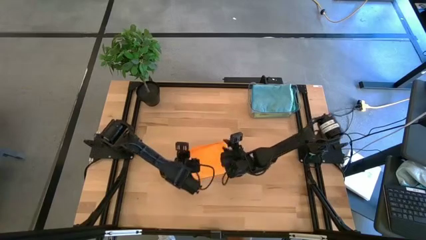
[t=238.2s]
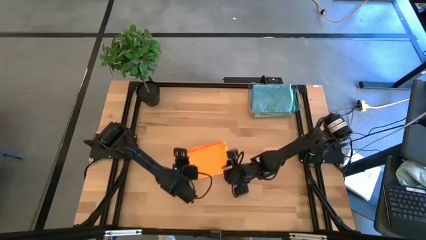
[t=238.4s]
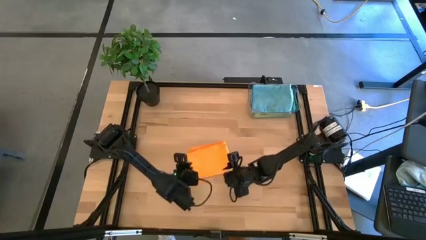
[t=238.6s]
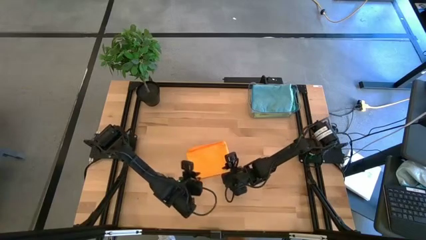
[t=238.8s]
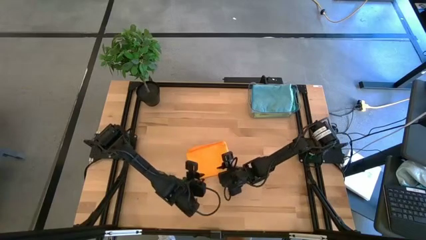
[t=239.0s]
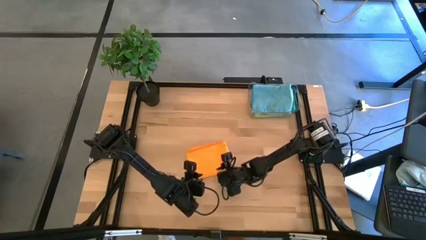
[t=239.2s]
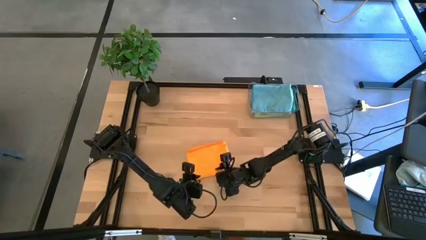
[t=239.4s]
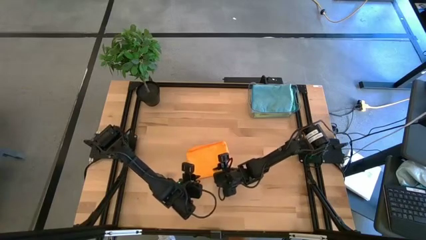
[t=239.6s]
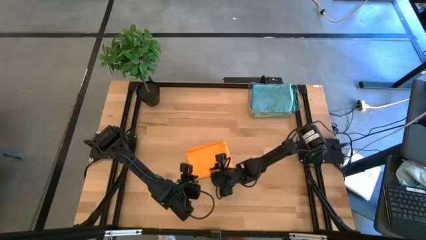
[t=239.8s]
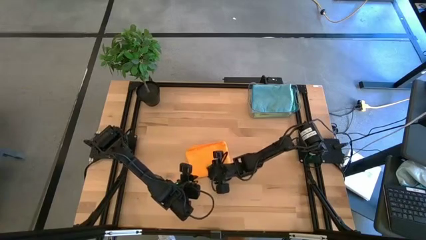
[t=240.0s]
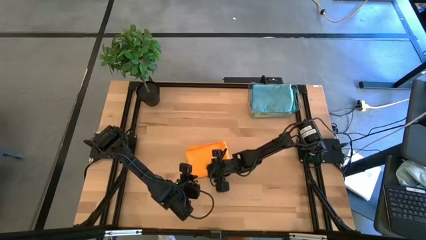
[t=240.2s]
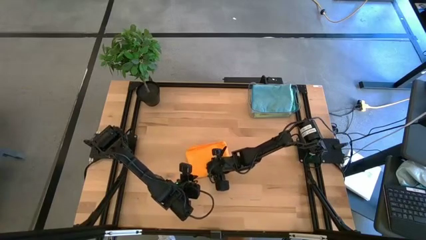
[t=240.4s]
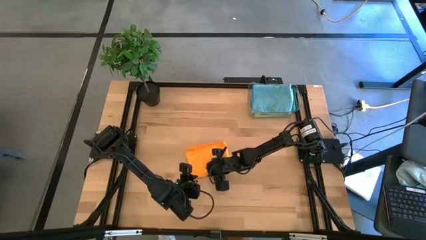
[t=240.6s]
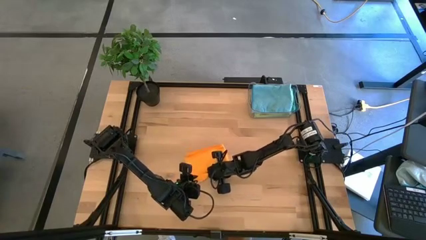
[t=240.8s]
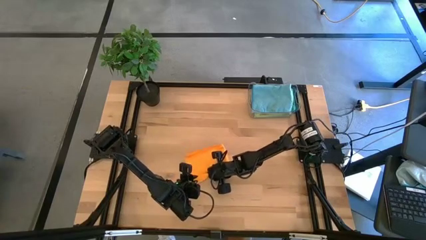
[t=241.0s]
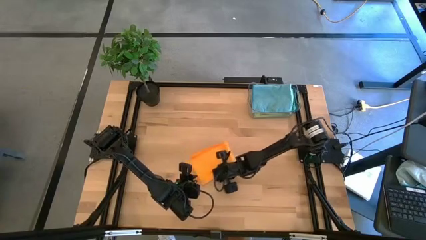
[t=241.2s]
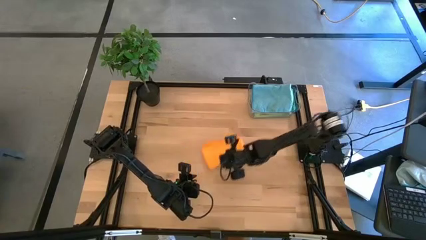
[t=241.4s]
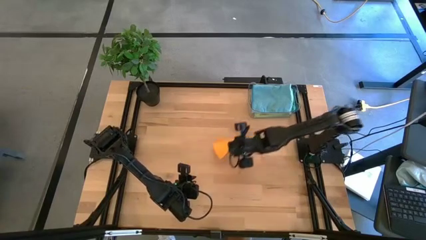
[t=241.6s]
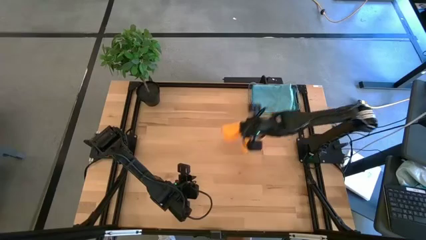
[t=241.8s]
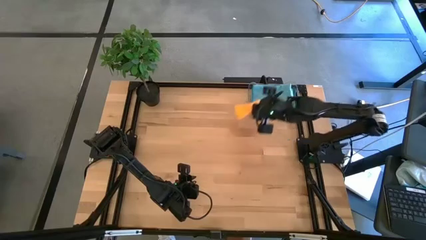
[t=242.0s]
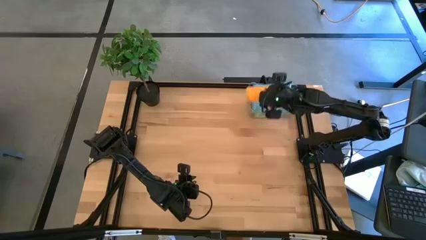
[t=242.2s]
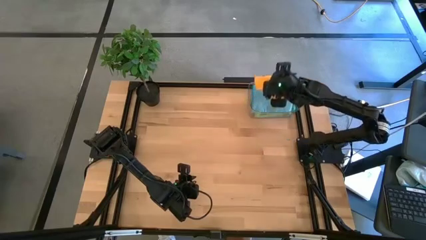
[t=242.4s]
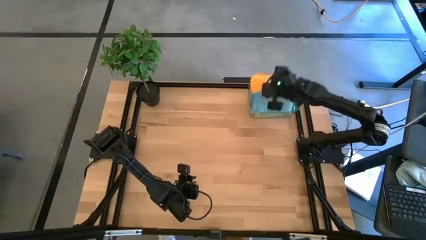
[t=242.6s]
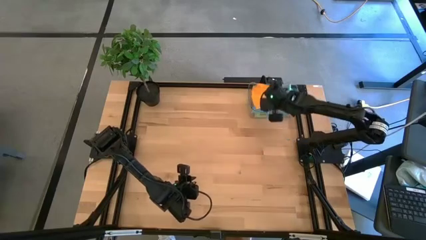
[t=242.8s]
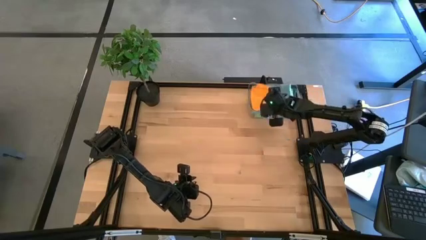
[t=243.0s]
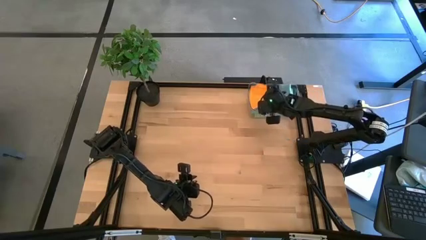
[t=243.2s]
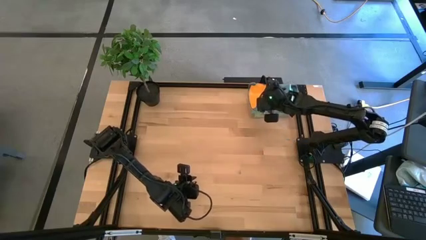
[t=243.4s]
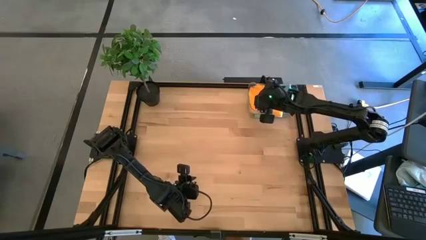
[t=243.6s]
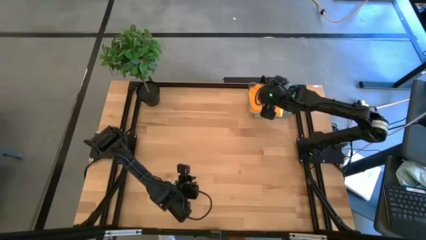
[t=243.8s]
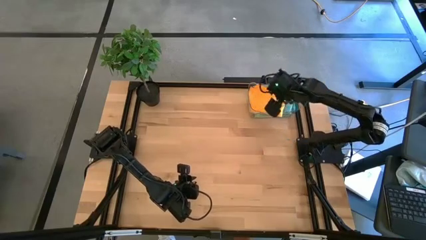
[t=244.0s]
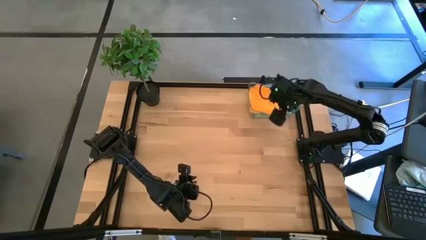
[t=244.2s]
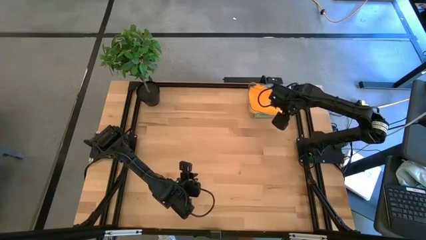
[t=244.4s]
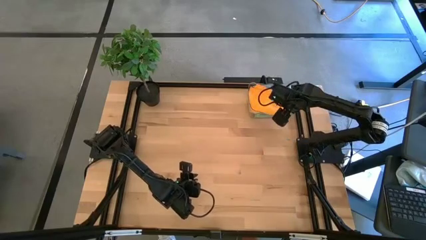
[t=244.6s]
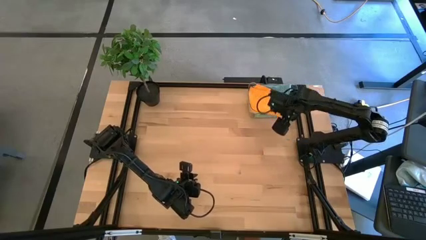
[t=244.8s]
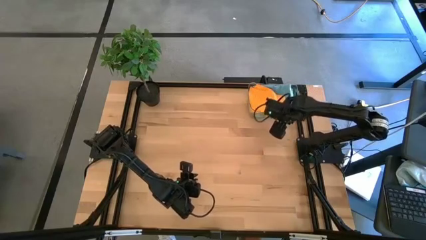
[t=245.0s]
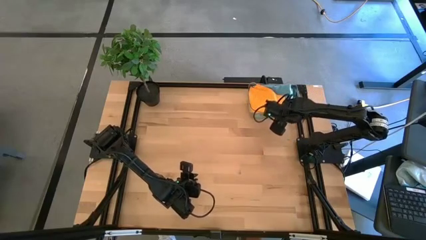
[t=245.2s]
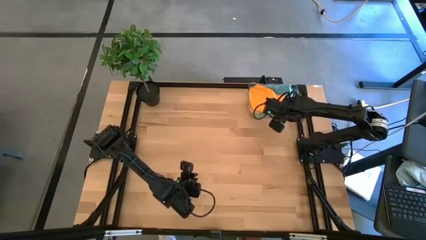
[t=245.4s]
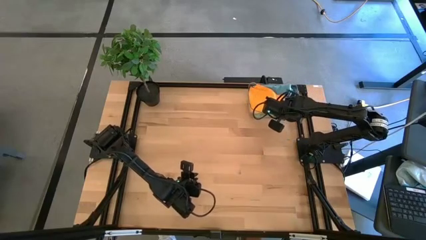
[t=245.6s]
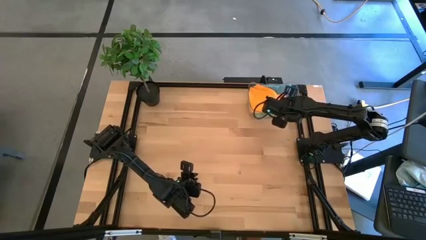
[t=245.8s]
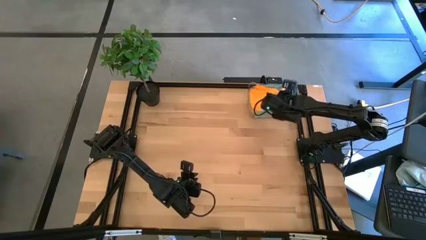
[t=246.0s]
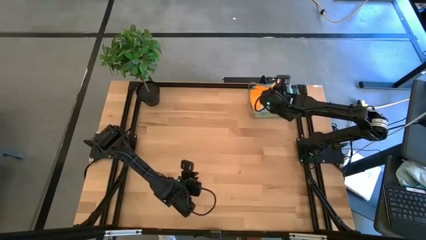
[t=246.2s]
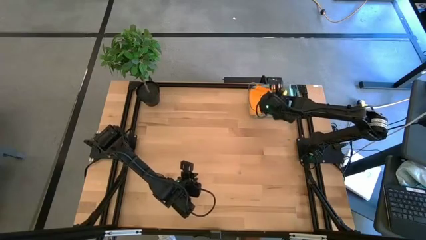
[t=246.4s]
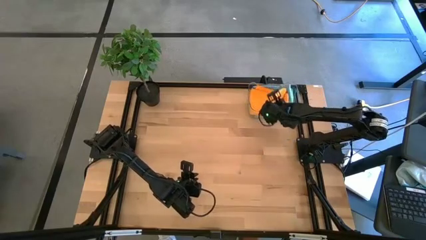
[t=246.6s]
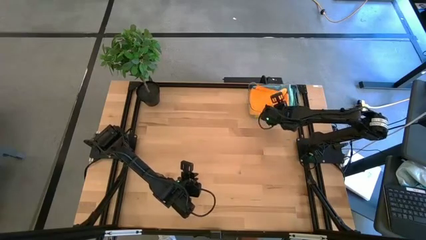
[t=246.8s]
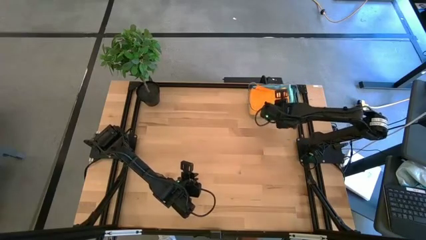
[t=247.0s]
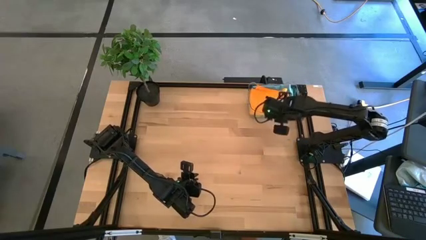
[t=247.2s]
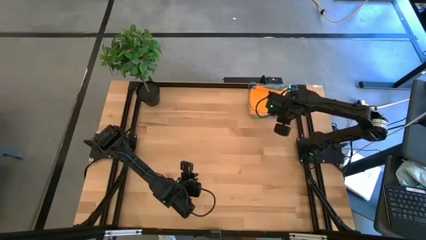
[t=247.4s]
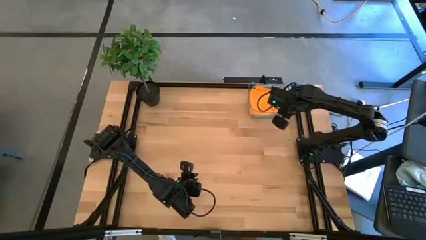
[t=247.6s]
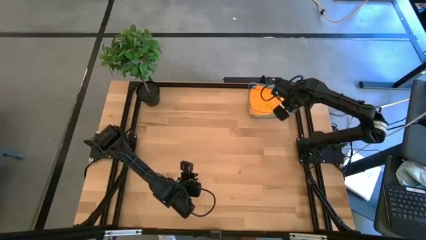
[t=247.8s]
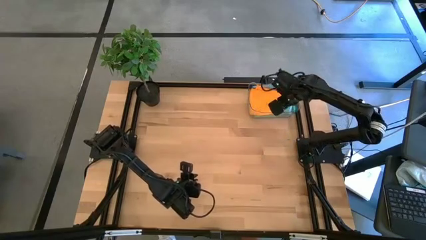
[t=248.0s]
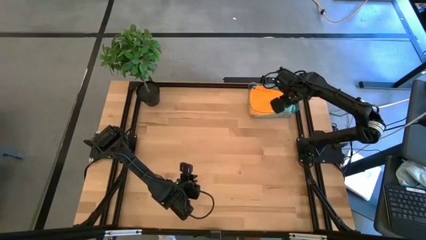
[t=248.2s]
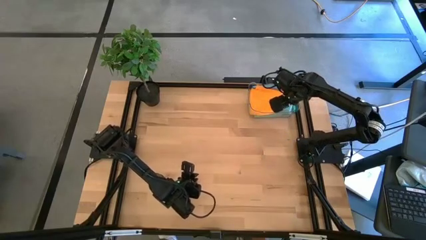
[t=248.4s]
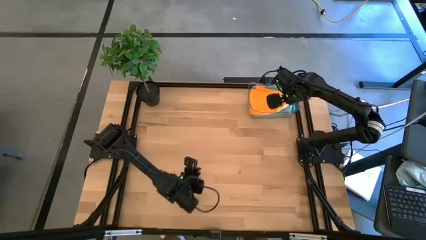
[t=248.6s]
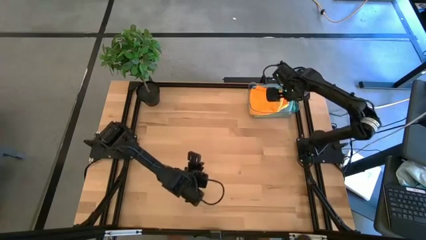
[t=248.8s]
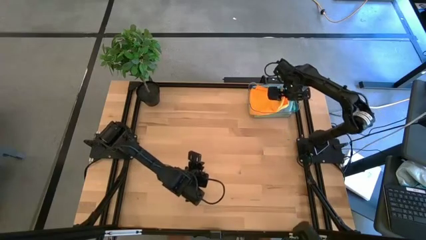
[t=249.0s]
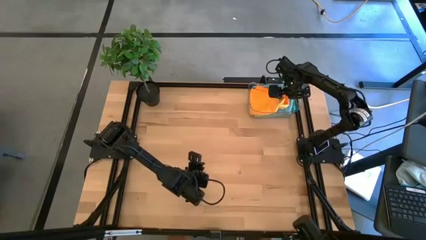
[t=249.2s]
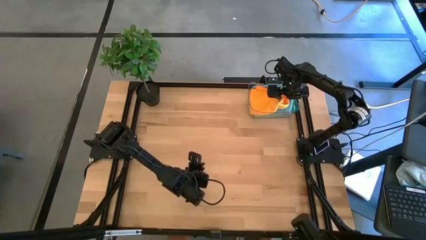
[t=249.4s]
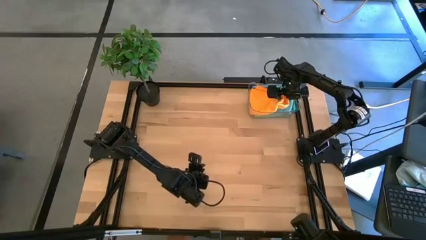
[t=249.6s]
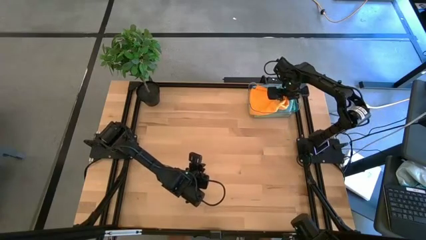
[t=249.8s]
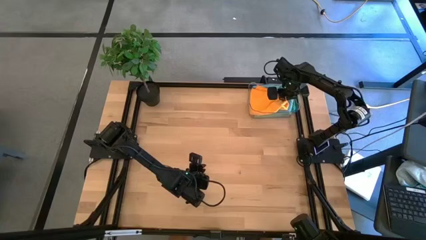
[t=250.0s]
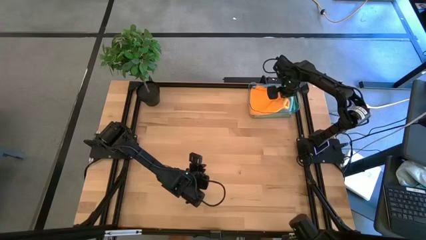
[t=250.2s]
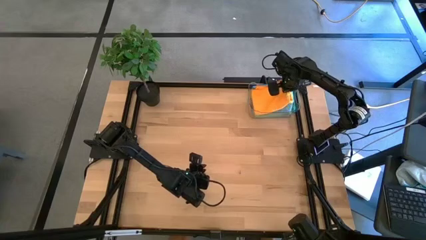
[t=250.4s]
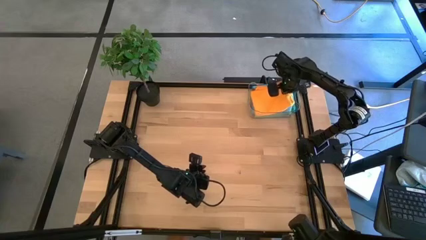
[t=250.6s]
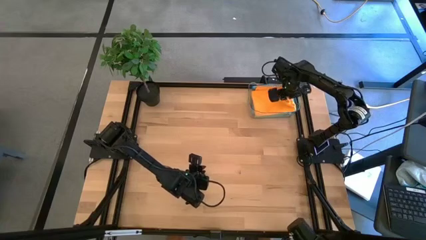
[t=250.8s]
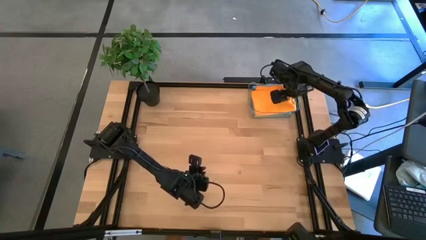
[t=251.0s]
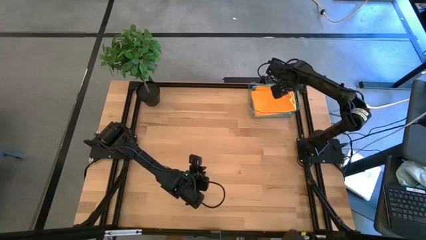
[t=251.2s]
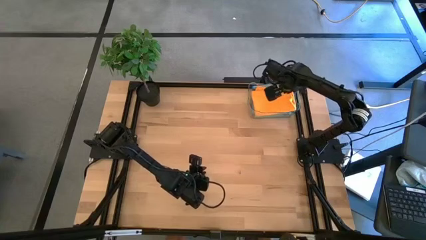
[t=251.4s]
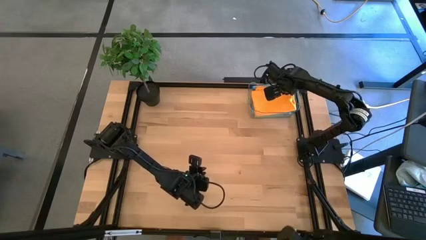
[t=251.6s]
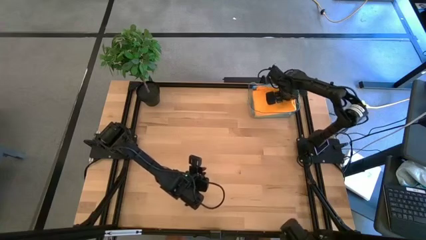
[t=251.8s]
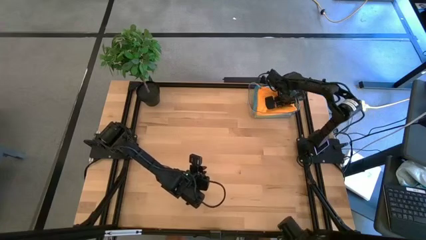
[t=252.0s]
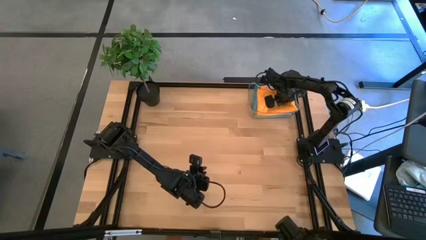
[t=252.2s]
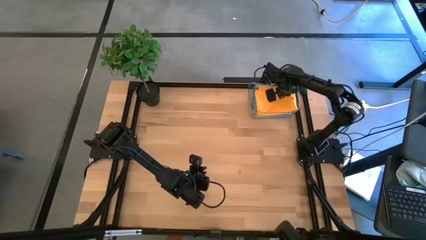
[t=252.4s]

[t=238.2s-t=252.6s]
Task: Fold microfiber towels
Put the orange microfiber towel into the transparent bin

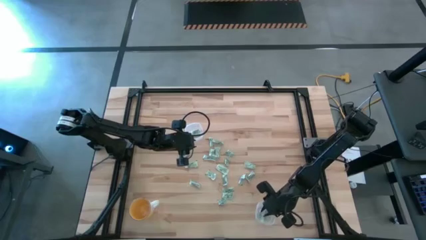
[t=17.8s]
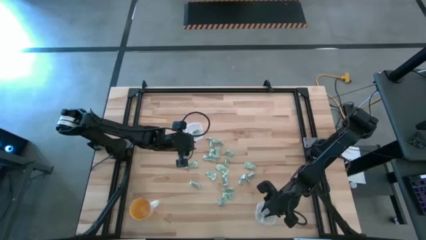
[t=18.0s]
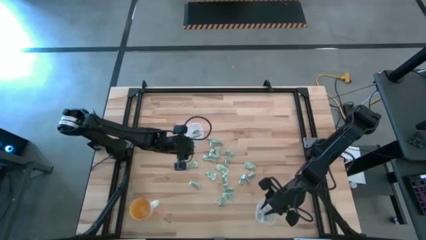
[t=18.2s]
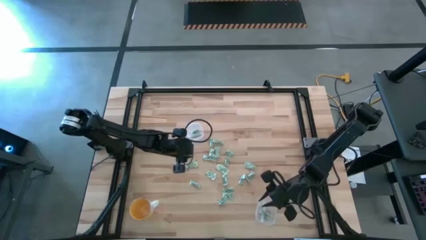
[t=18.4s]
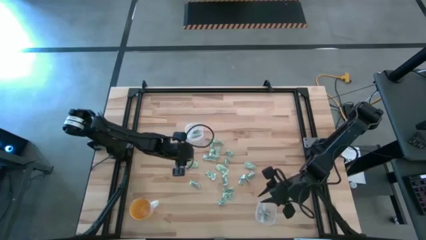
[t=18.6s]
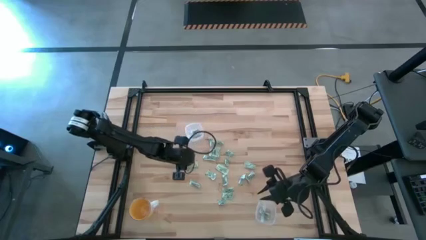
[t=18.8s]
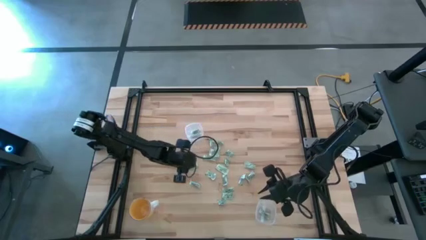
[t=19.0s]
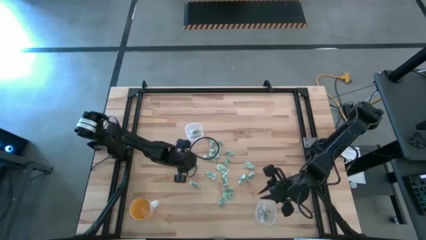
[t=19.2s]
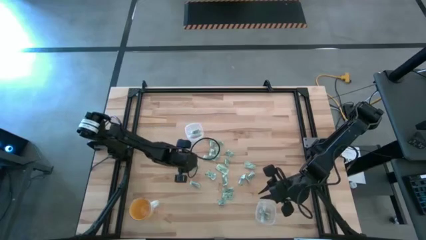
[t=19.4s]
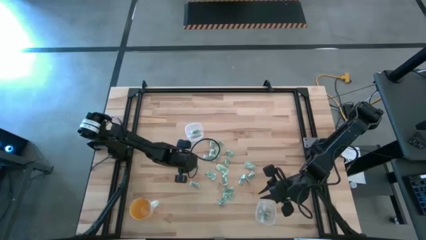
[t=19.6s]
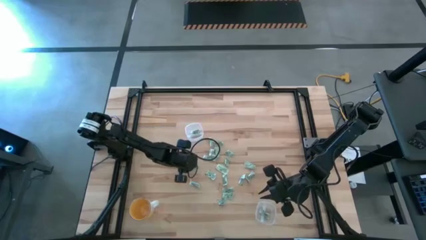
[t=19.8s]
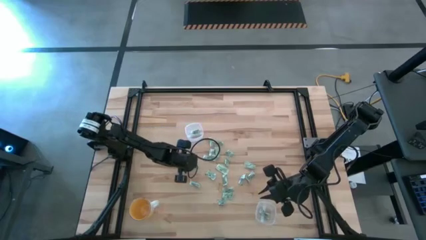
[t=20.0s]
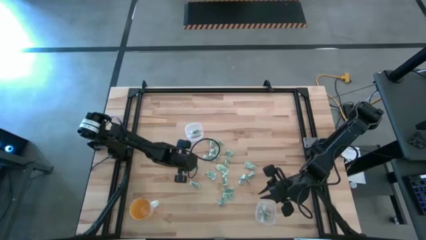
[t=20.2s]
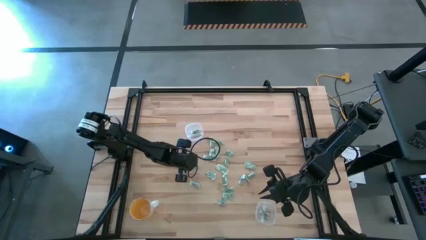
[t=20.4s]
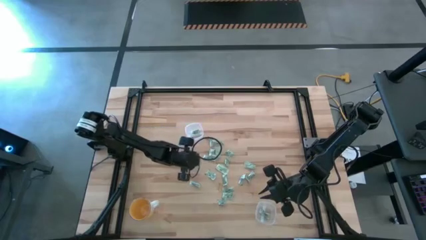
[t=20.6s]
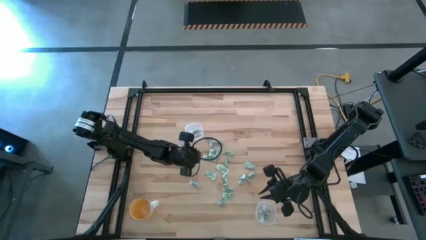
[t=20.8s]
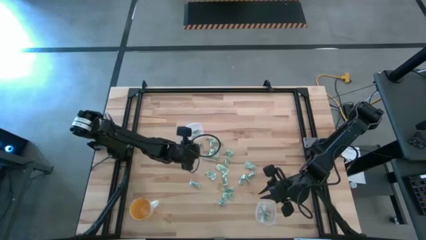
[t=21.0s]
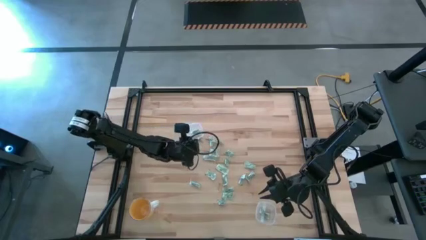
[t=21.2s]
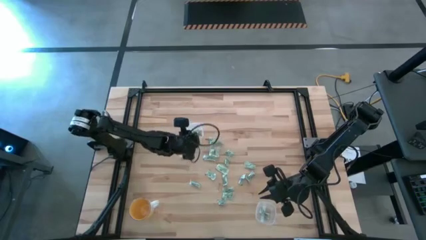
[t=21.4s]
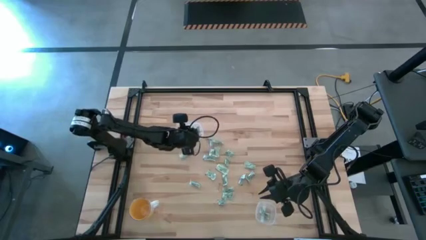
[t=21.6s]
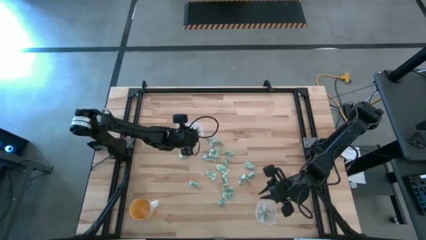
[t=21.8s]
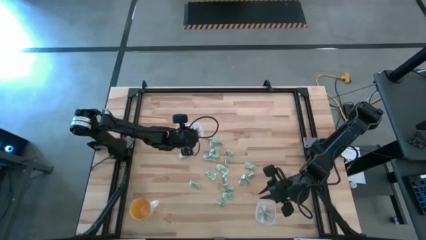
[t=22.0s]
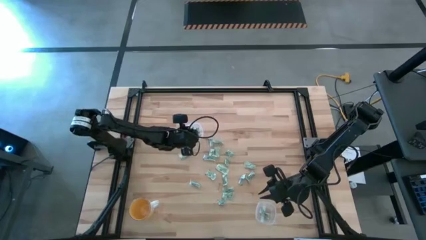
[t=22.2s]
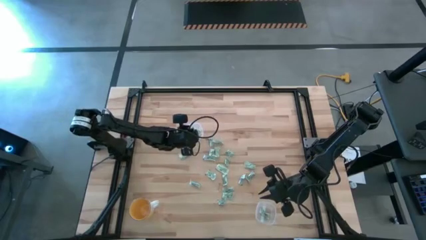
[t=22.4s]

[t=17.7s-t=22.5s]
Task: Pick and place Stevia / Truvia into bins
Put the stevia packet into the top transparent container
